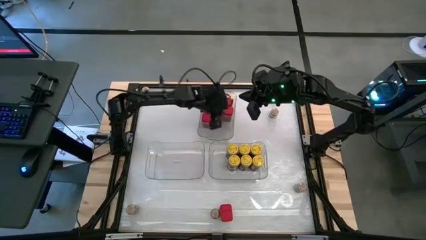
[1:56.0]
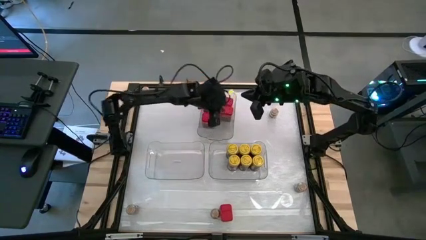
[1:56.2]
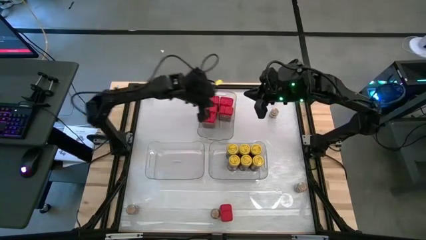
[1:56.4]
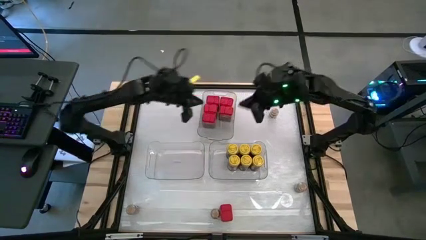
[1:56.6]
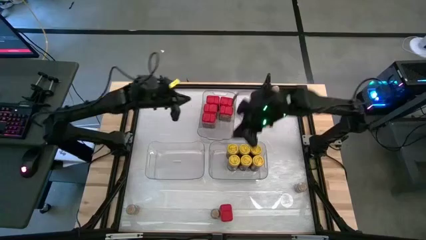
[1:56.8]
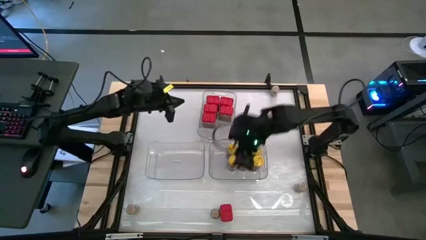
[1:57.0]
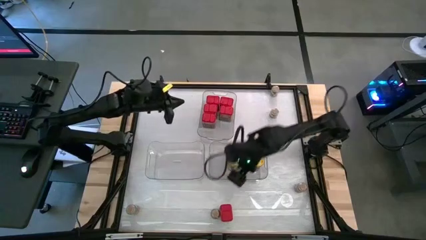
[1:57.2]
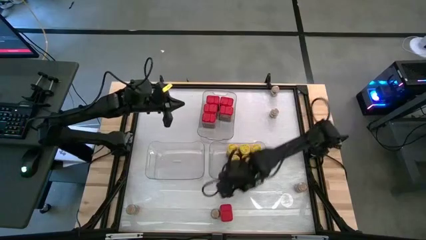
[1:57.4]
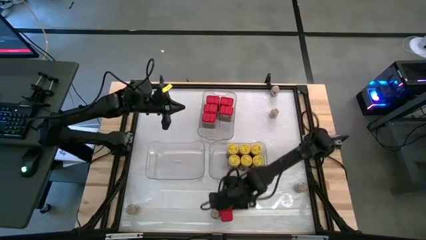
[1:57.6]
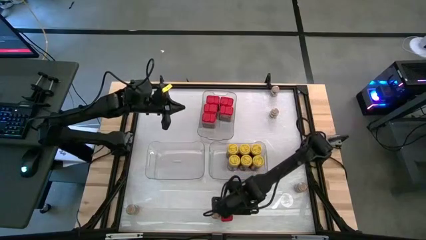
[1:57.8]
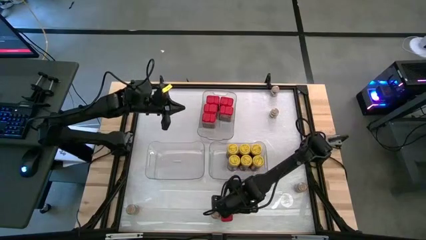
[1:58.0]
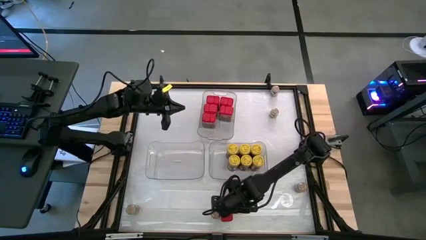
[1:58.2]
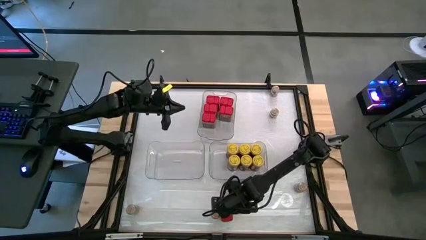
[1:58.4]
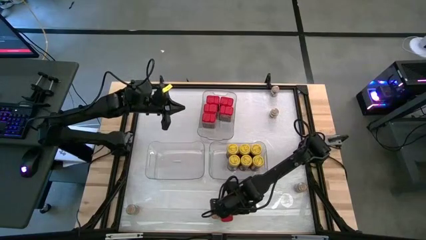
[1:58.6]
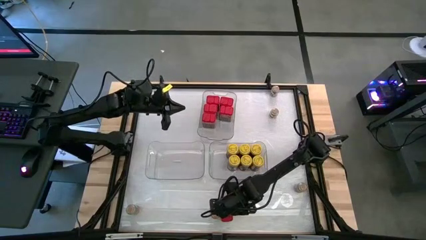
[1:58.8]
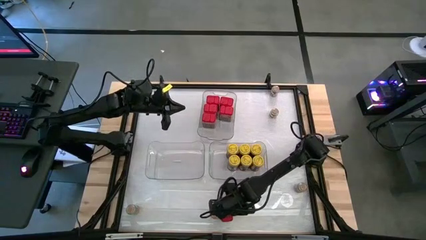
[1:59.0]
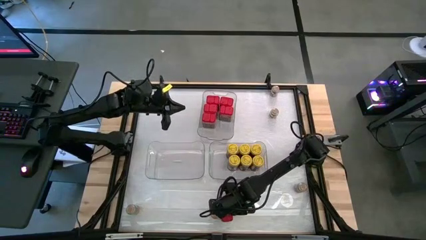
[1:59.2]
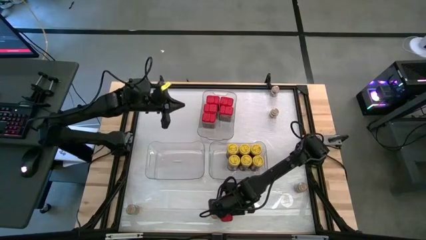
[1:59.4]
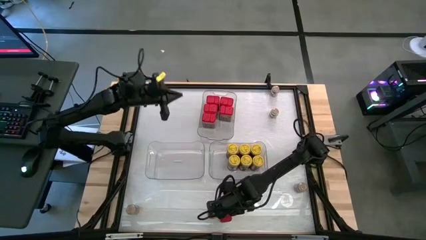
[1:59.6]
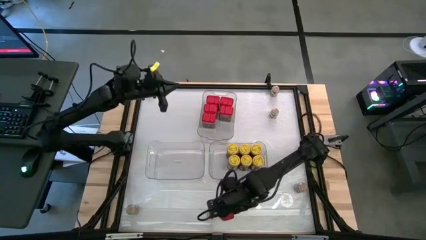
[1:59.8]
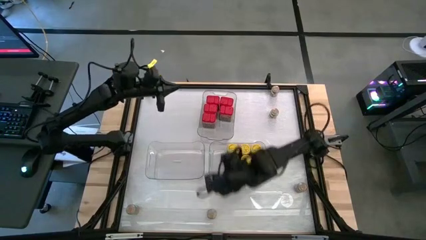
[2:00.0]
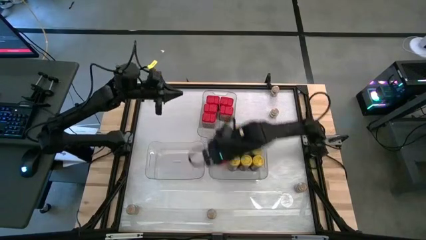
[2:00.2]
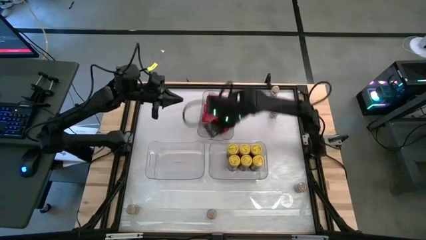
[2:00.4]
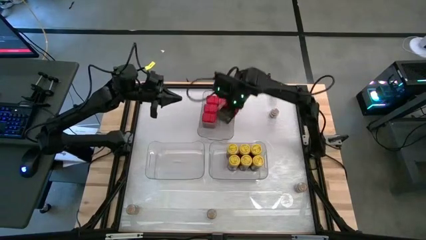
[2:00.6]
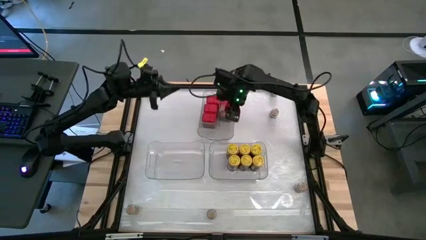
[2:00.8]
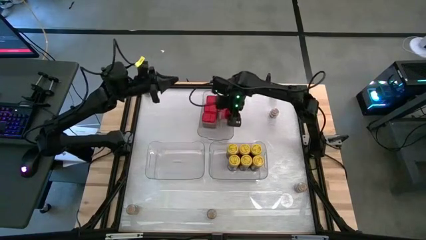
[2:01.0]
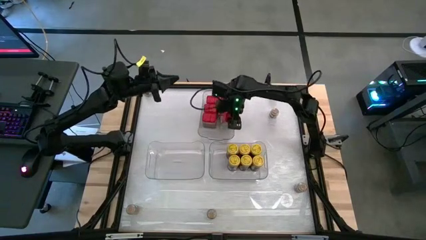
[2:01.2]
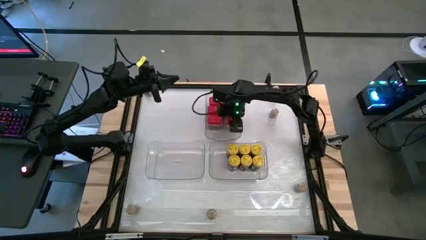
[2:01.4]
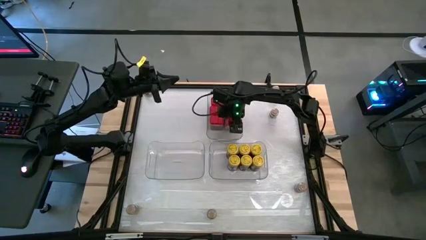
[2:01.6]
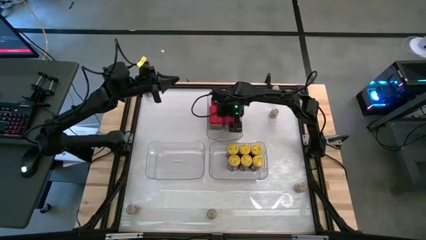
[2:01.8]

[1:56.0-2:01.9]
Task: Sort spices by type
Put the red seasoning can into the top transparent bin

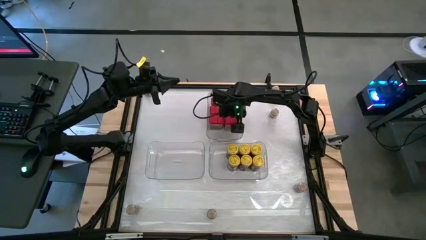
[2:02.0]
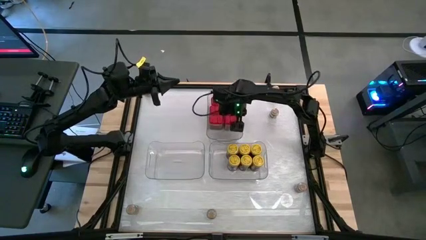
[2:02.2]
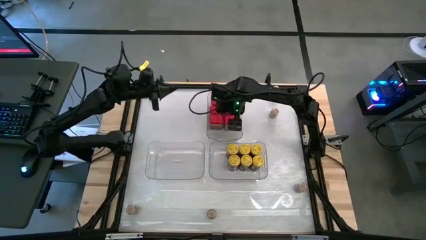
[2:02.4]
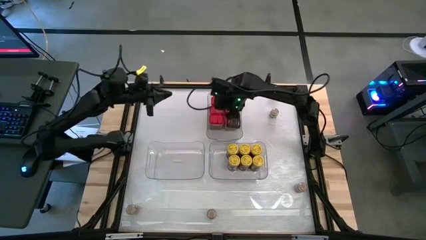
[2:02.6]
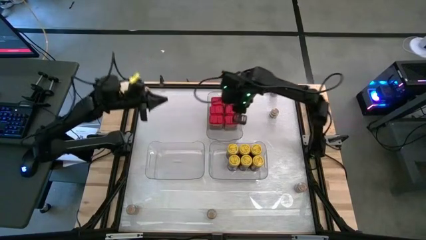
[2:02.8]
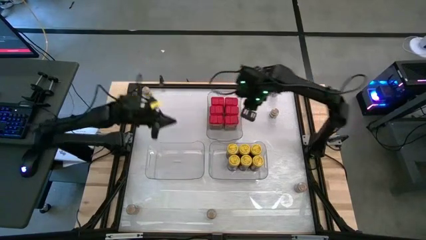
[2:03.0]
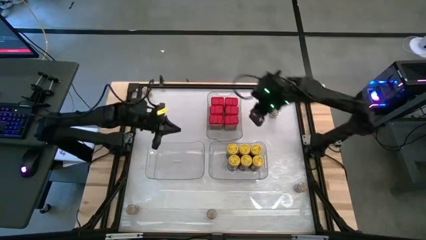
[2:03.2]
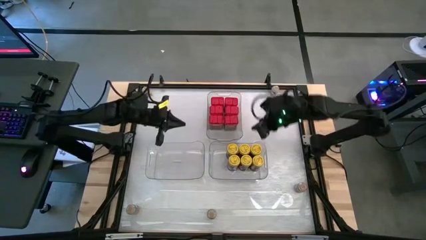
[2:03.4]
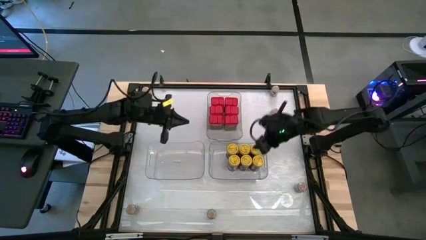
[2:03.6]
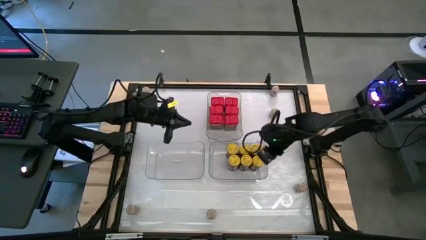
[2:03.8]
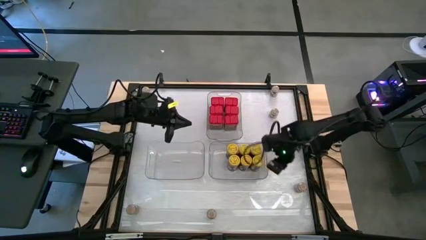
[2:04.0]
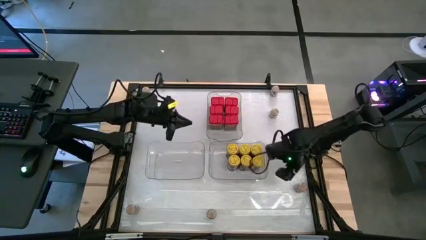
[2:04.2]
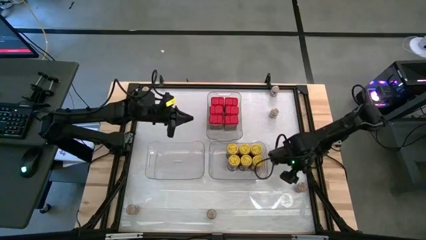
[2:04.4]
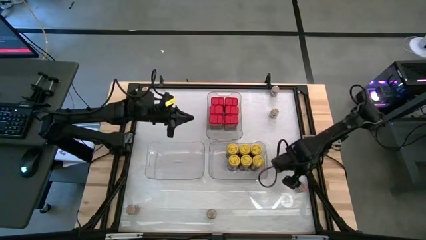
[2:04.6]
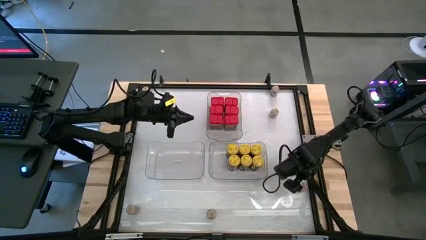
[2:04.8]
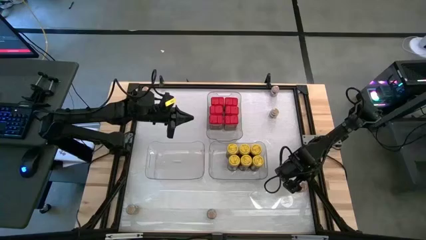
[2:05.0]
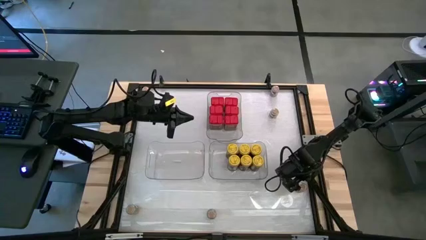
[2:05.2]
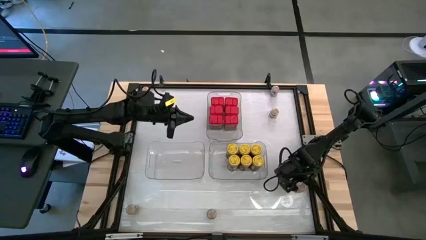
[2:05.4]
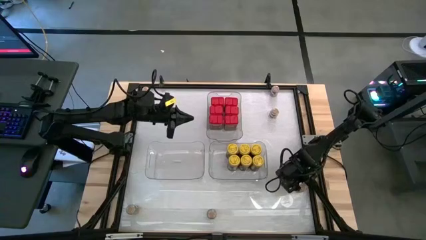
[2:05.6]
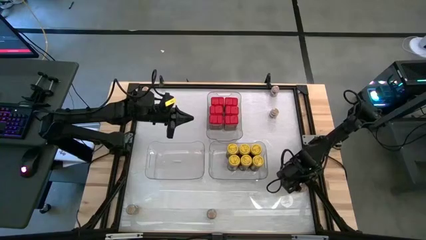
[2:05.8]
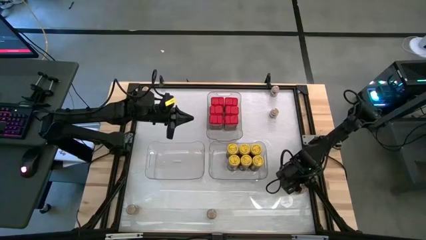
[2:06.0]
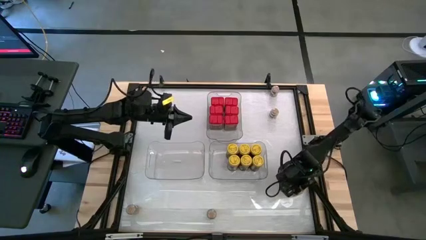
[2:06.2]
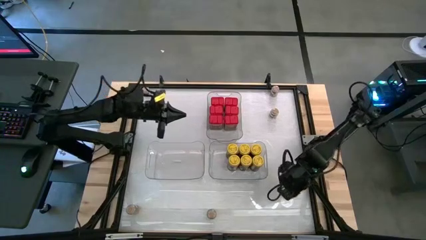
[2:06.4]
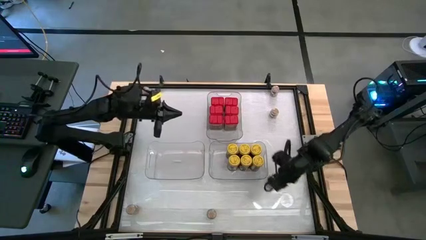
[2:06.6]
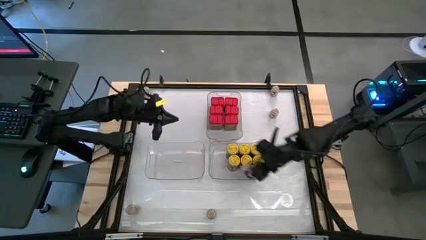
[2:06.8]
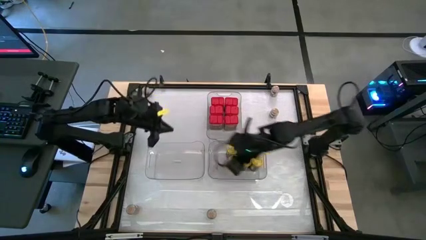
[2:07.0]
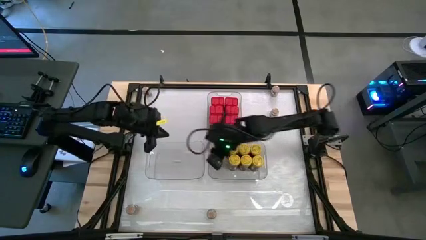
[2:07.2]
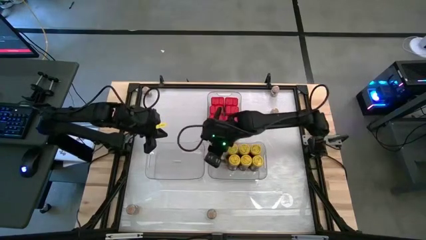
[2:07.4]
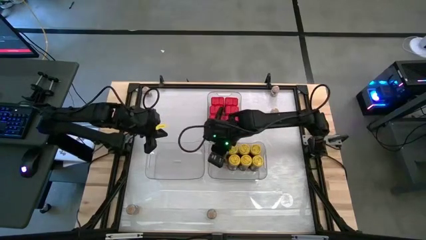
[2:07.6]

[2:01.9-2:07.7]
Put the brown seasoning bottle into the bottom left transparent bin

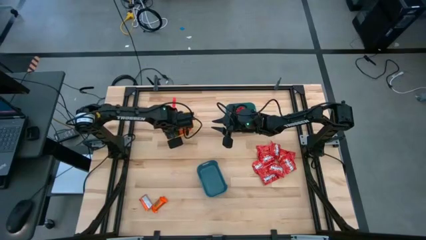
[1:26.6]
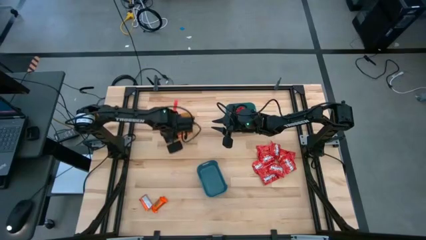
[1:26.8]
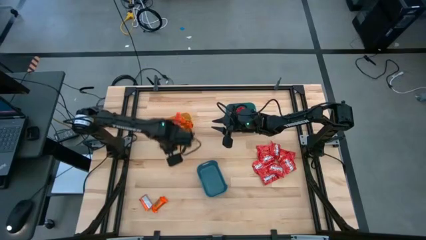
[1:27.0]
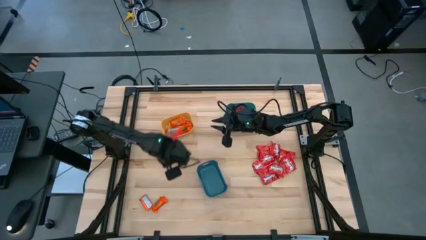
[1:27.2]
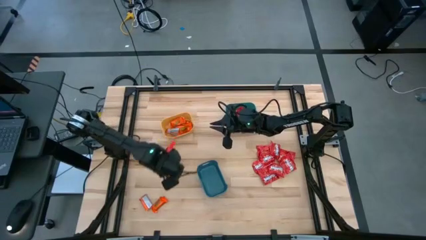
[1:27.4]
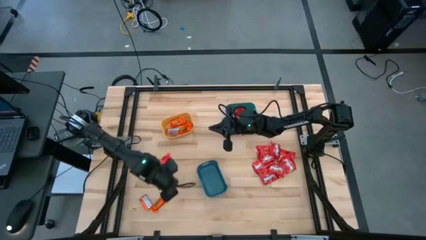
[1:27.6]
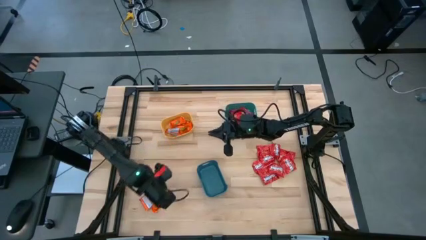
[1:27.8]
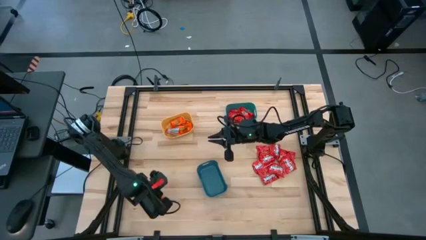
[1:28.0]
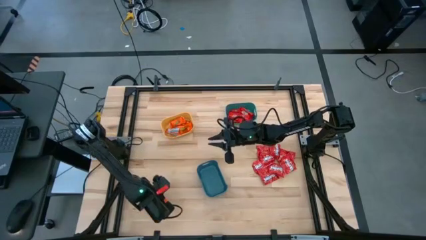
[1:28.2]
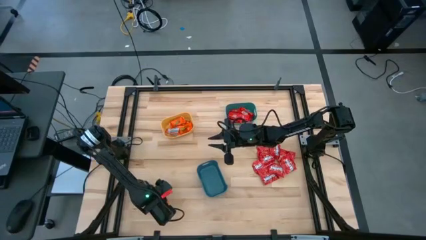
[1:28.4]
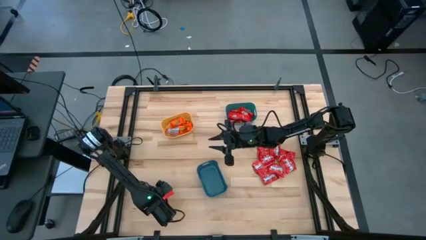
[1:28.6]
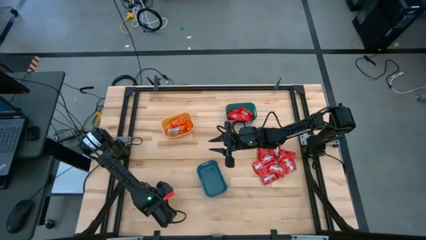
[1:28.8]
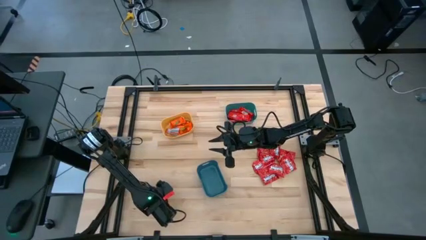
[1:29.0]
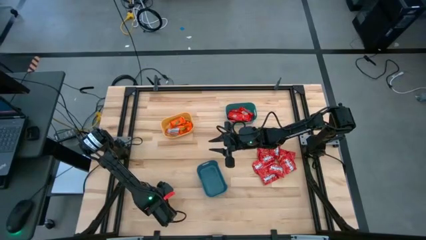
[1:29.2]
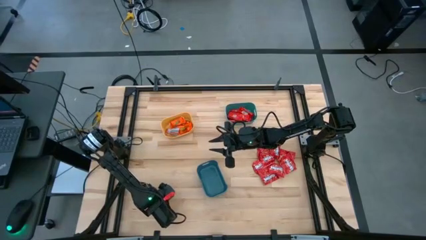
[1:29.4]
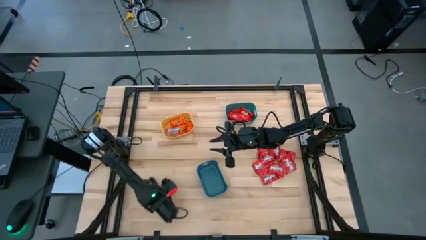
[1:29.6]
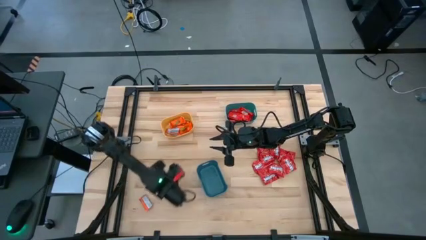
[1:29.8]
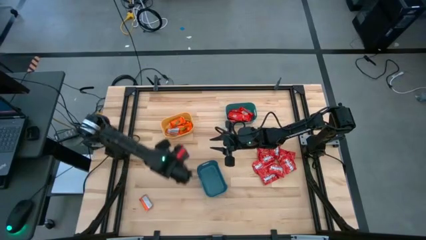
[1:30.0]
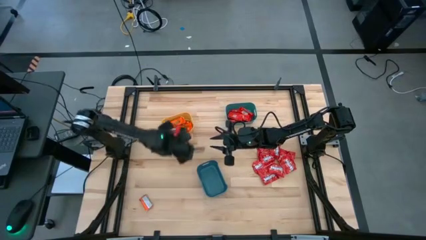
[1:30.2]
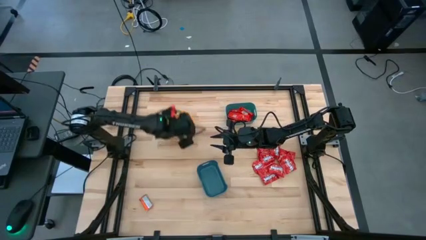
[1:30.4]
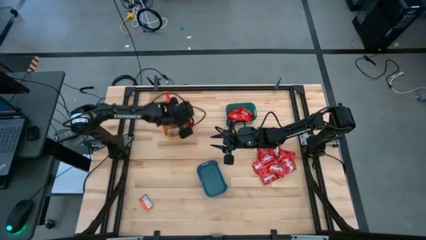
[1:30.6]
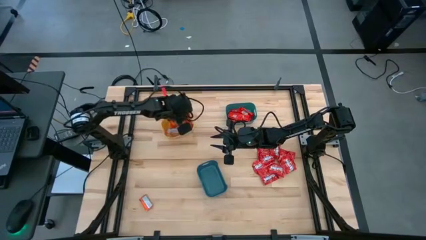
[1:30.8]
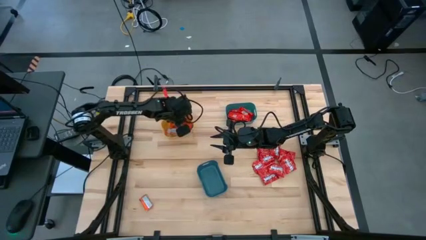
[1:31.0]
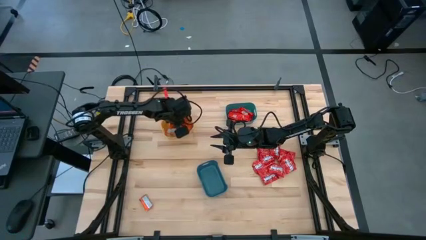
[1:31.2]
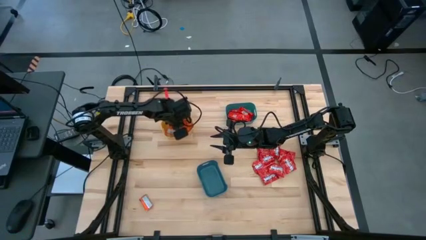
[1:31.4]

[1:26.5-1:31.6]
Task: Sort candy
Put the orange chocolate bar into the yellow bin
